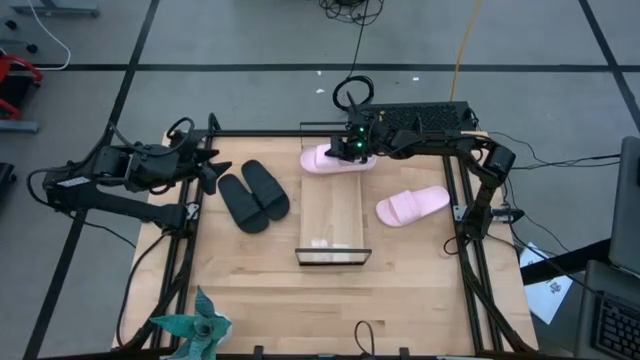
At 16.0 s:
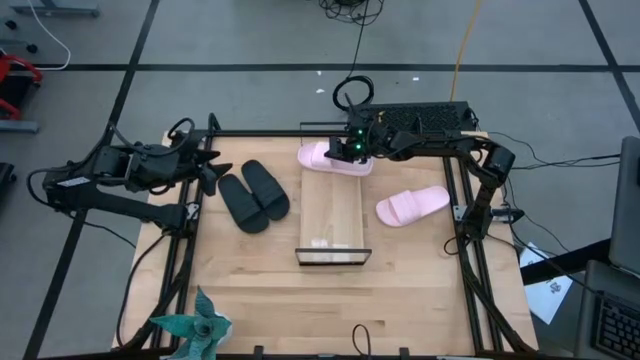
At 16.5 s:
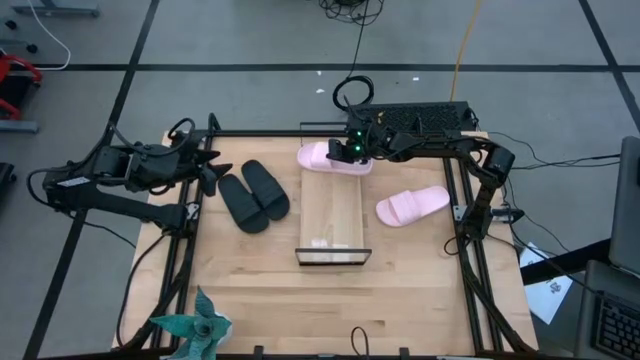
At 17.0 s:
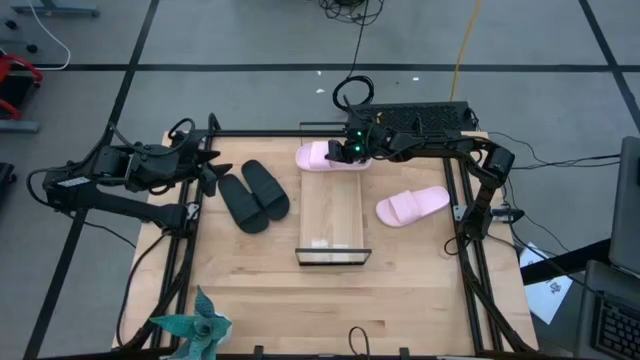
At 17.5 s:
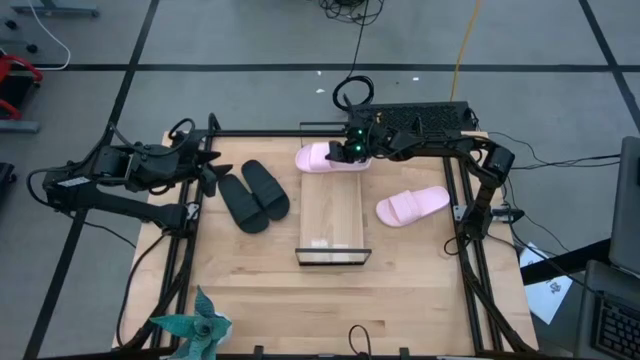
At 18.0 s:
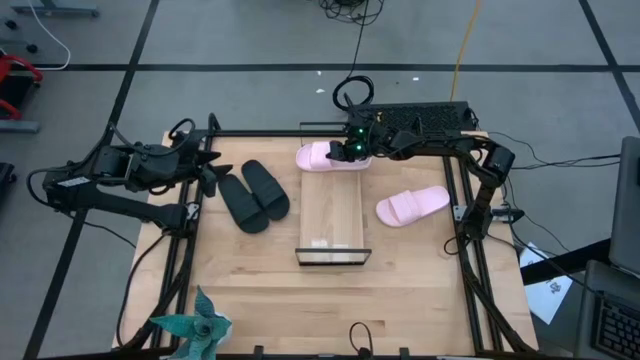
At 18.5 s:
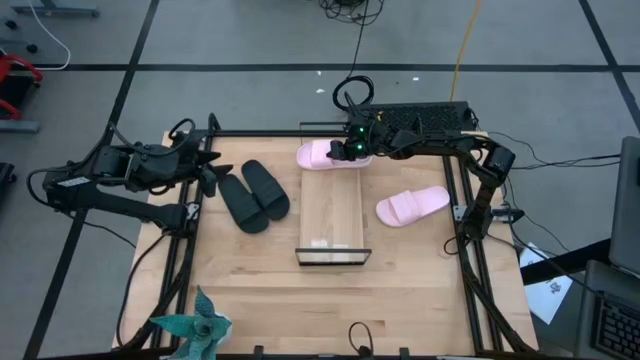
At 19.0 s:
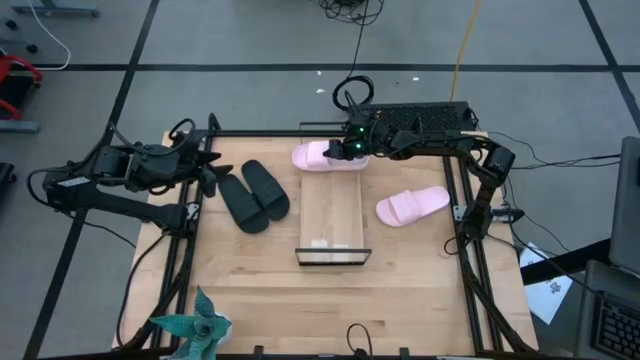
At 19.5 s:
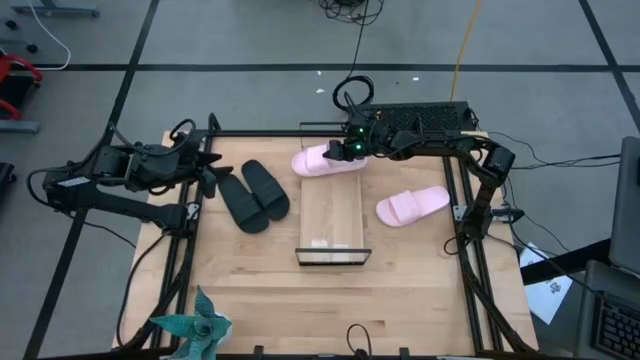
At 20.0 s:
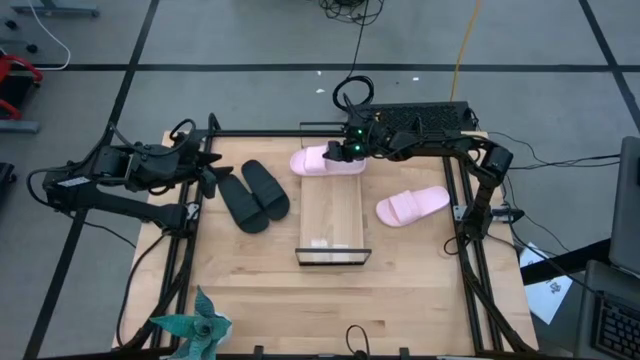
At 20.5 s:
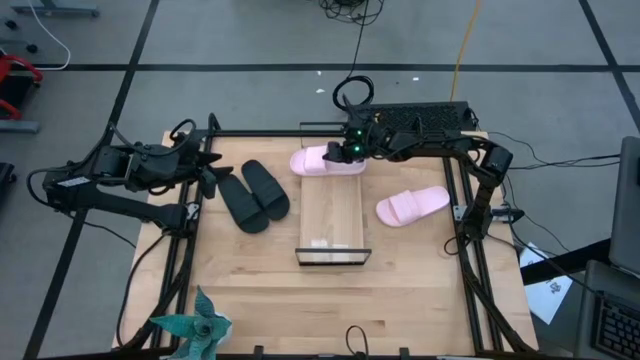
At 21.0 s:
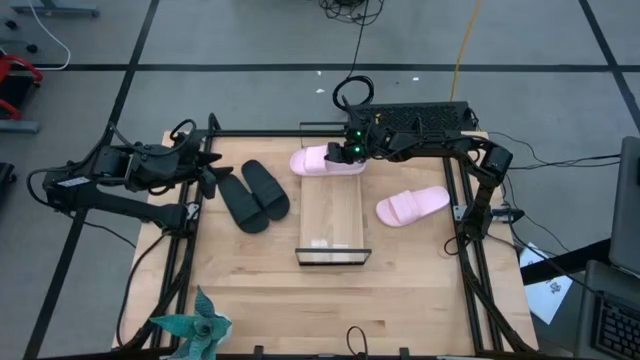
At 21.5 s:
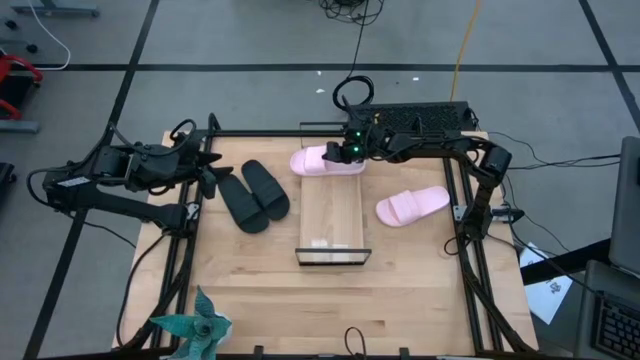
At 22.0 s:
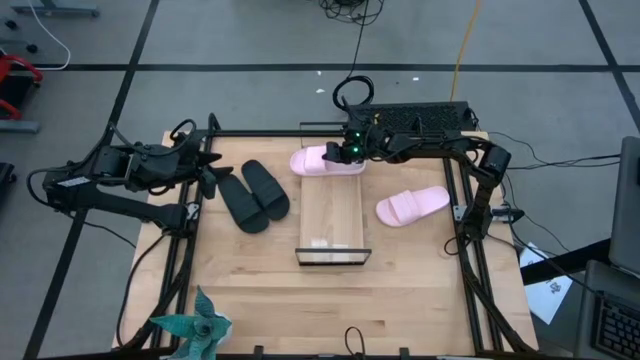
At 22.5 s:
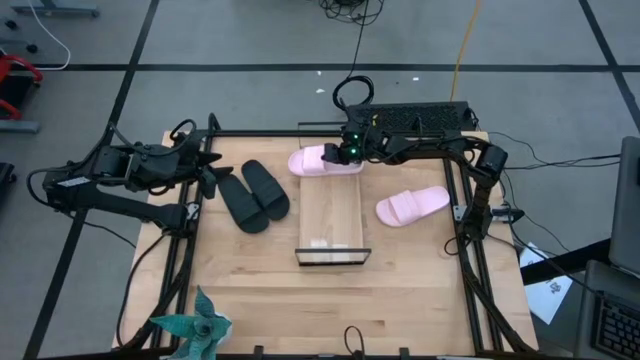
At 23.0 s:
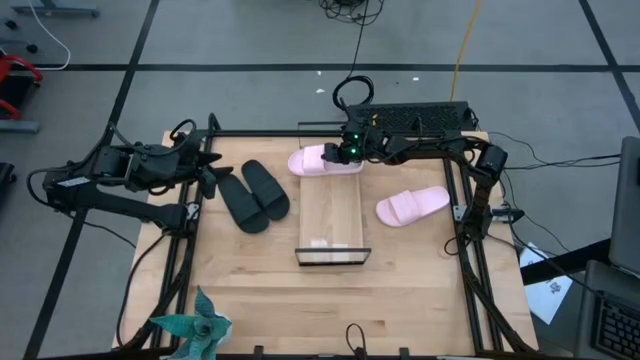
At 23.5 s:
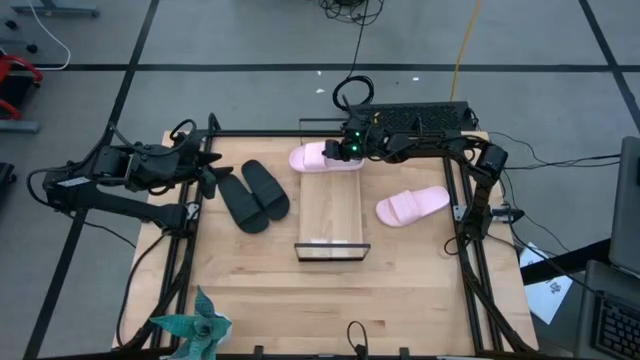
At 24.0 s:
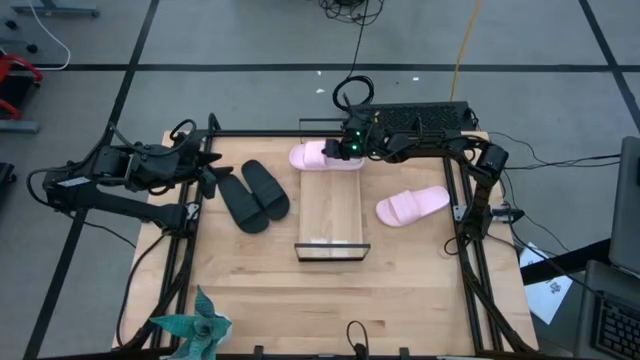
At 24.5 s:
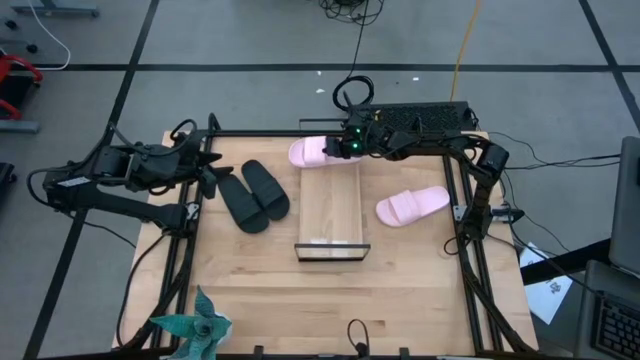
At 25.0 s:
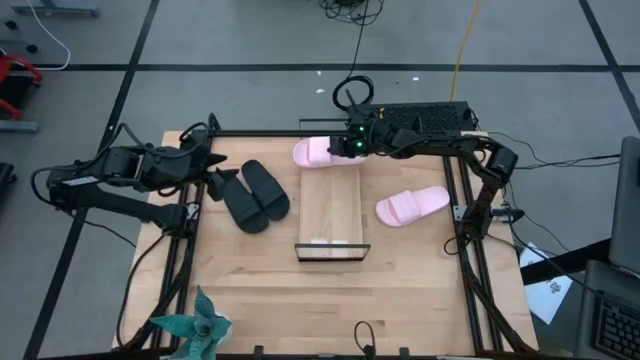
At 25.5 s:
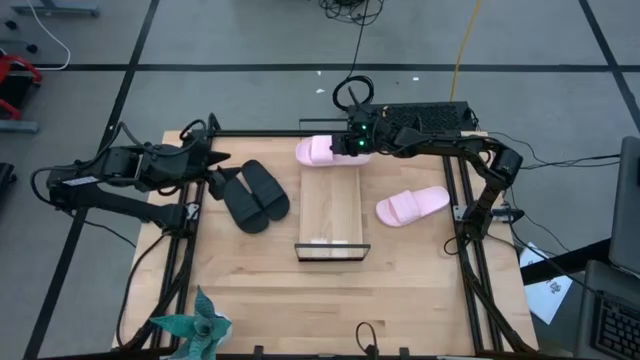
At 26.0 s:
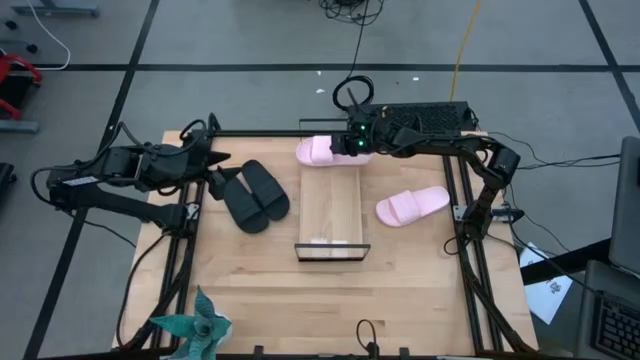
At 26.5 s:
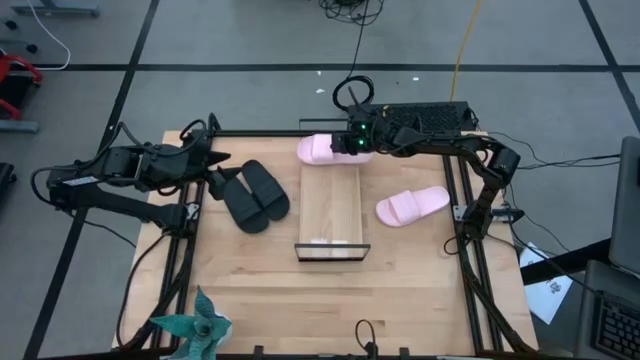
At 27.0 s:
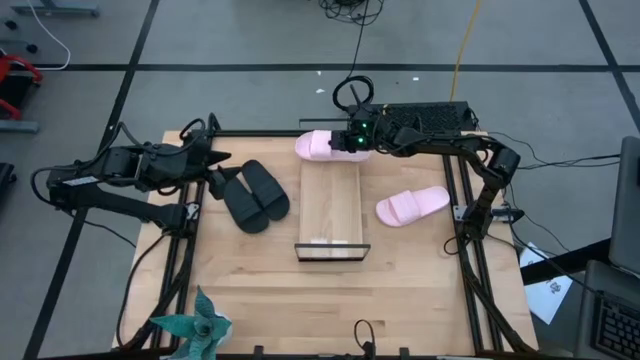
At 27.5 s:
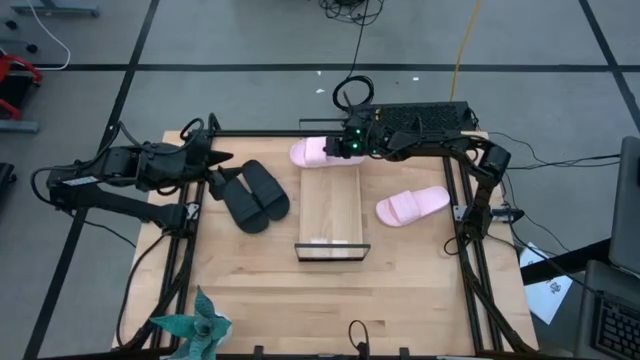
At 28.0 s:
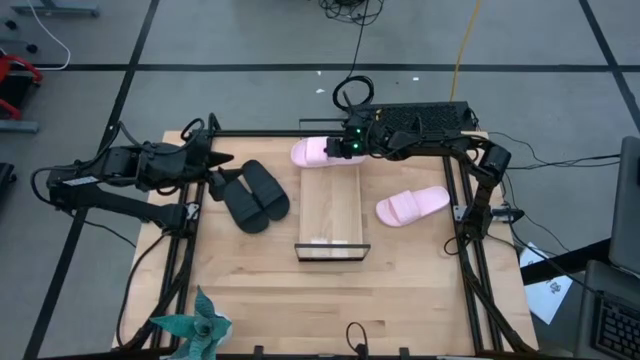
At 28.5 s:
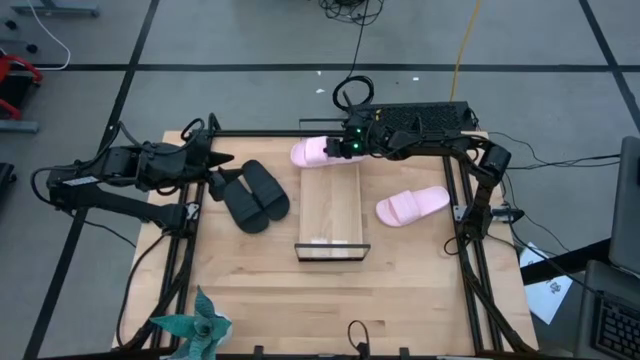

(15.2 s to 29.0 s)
Task: Pick and place slides into the shelf
Put the top pink slide on the shelf
